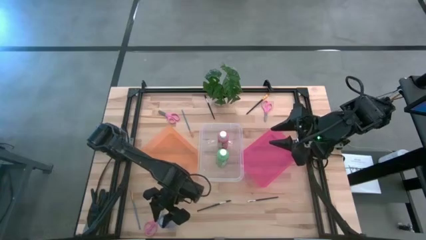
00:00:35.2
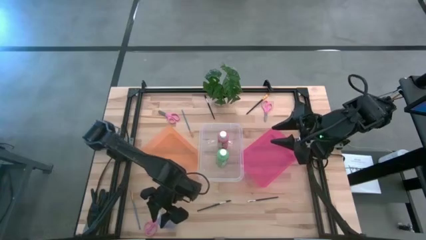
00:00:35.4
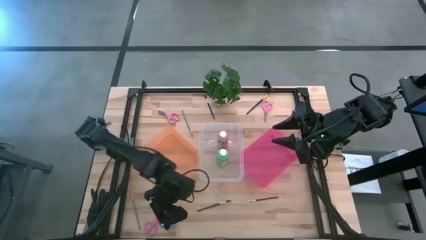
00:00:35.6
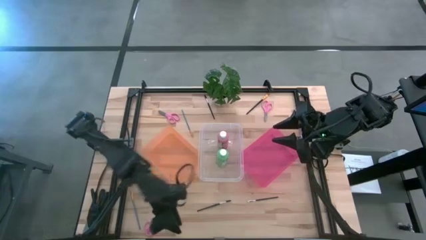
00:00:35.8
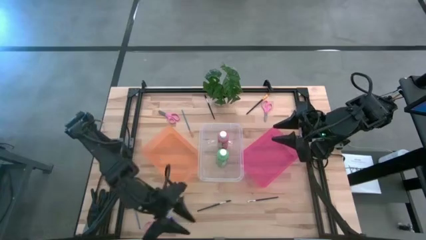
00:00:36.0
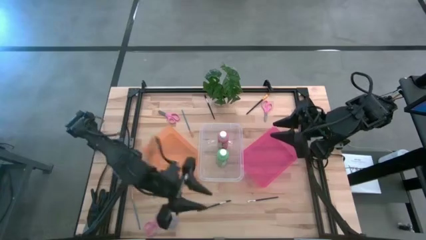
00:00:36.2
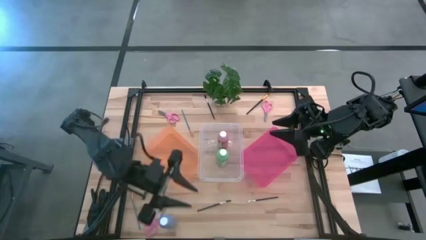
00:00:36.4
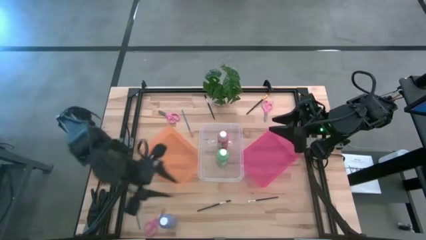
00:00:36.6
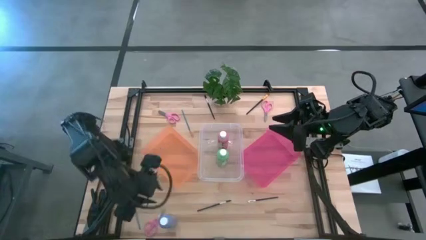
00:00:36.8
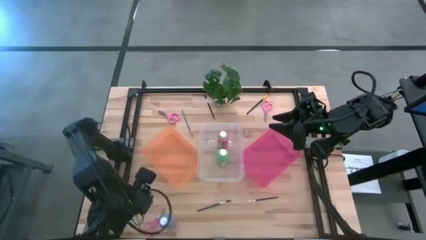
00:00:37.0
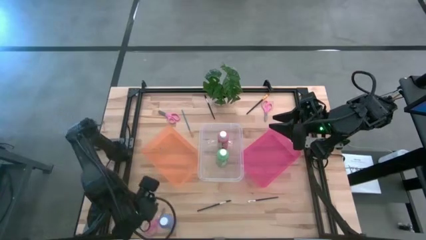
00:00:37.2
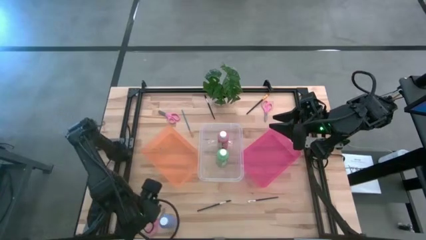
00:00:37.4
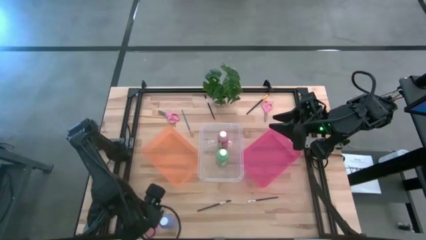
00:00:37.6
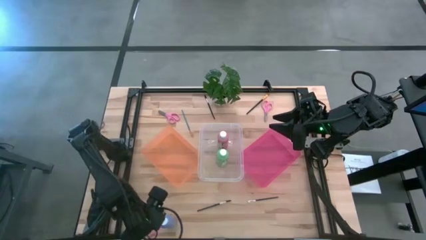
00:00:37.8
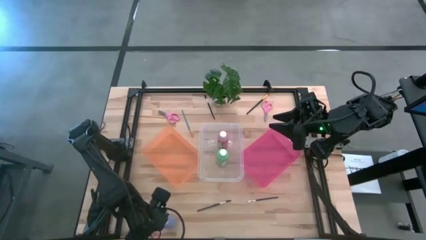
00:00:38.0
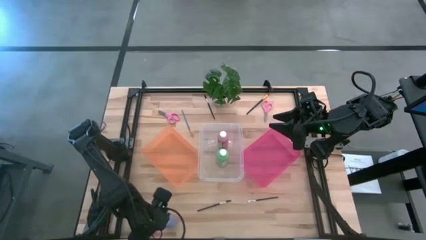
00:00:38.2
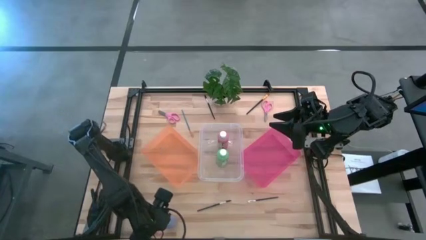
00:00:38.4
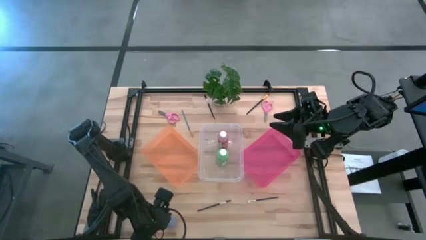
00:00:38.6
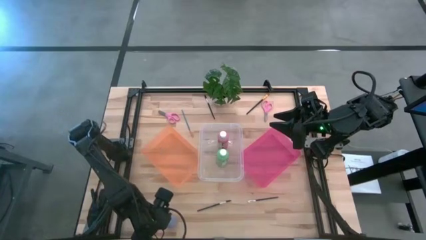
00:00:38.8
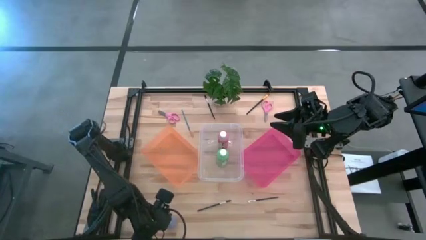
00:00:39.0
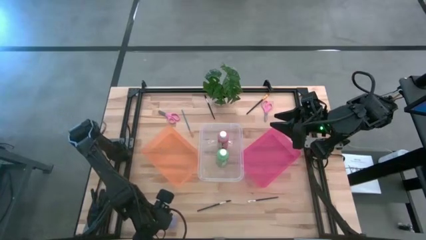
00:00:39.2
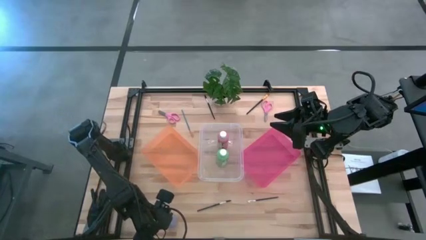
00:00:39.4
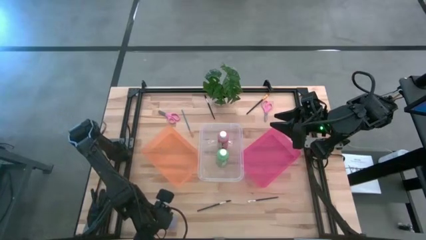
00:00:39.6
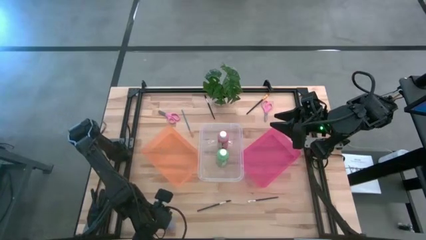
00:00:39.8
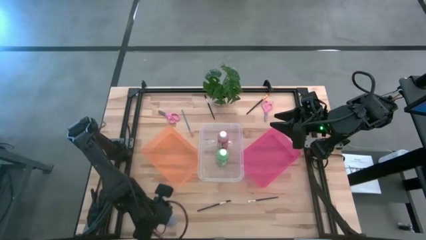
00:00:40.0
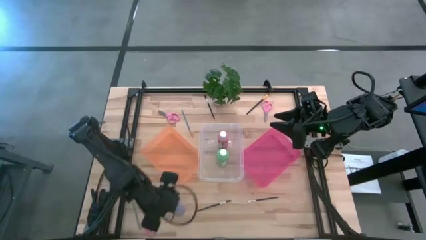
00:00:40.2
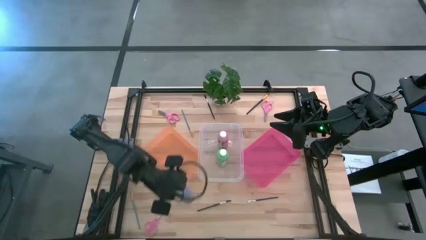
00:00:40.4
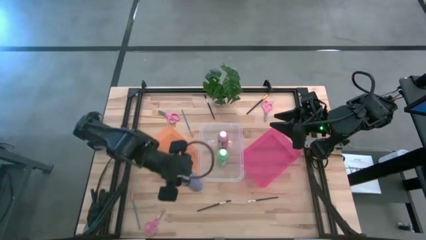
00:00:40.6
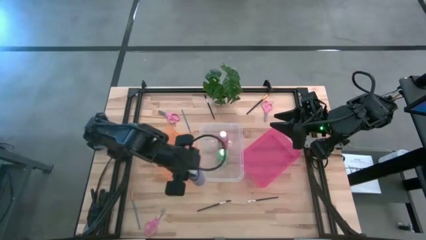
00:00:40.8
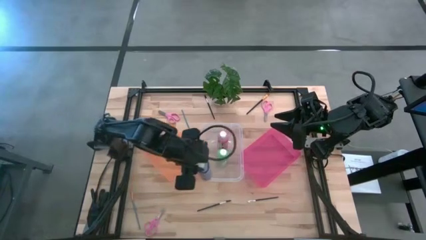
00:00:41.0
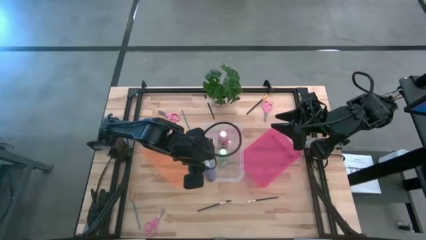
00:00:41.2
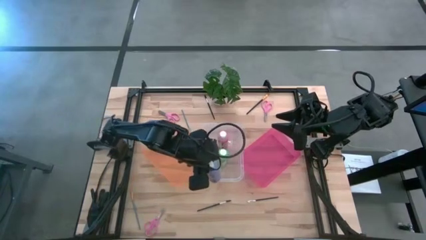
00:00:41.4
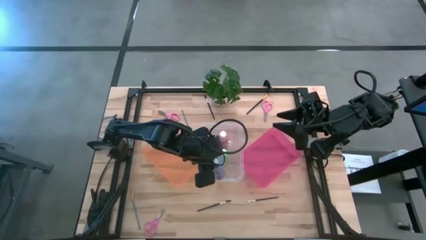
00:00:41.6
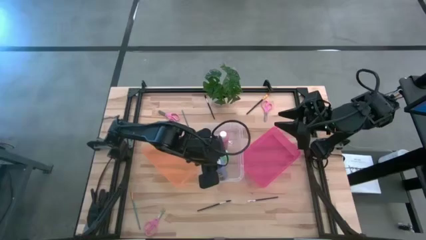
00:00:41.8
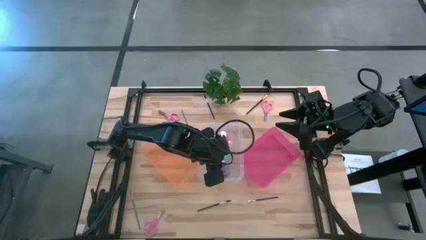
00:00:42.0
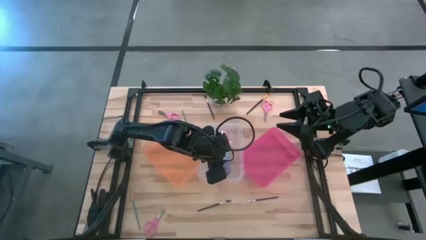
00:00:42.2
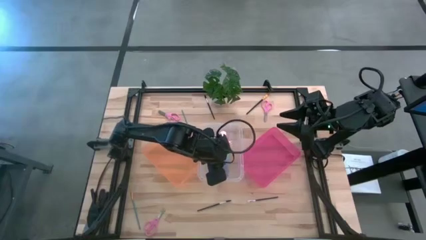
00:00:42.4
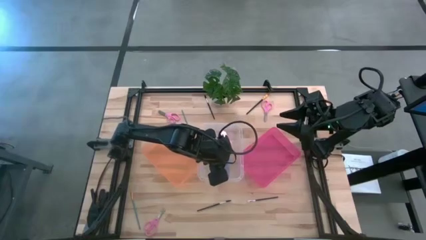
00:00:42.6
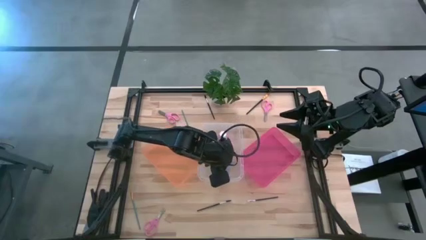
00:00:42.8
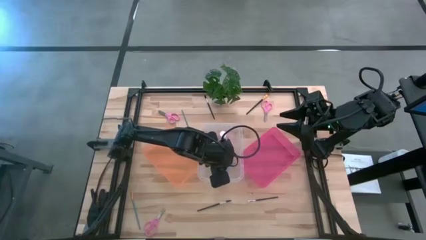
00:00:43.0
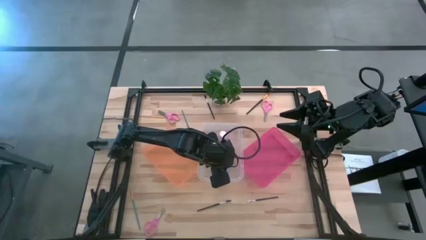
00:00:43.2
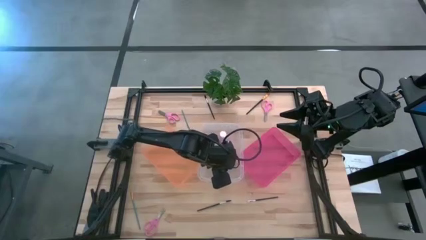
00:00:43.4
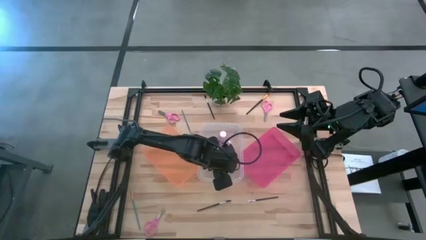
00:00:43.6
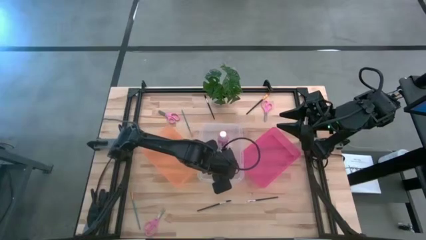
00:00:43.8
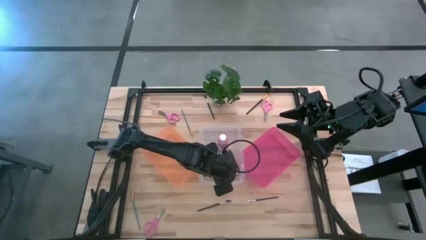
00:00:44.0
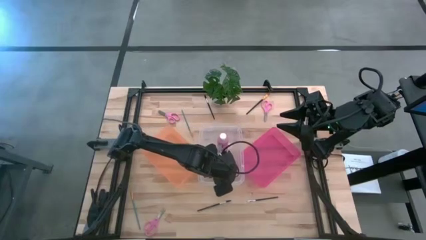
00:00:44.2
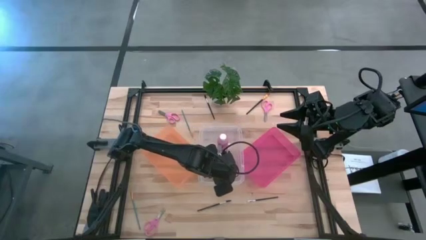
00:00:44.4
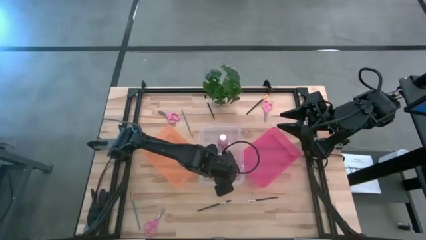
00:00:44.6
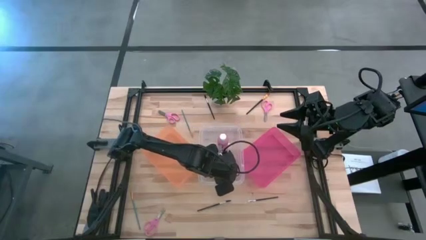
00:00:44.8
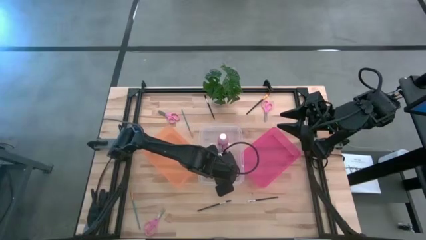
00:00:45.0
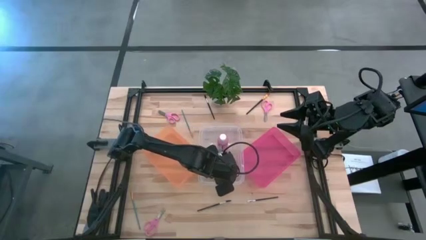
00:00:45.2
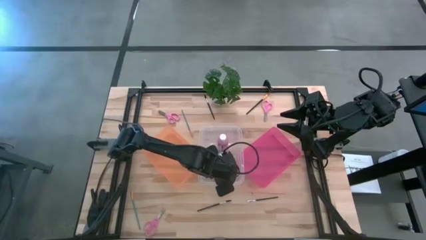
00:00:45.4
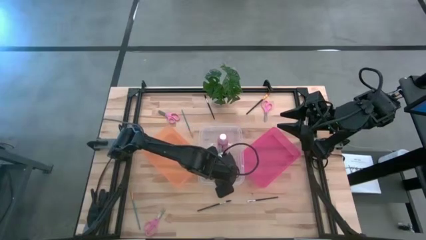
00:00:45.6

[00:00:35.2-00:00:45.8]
Task: Pick & Place Paint Supplies
Put the blue paint bottle into the transparent bin

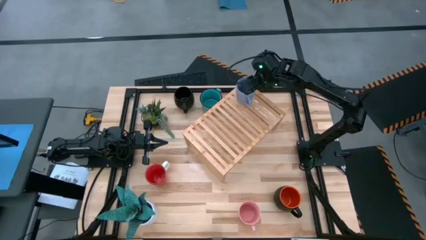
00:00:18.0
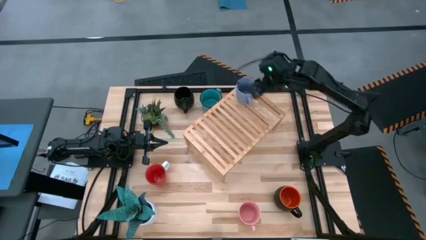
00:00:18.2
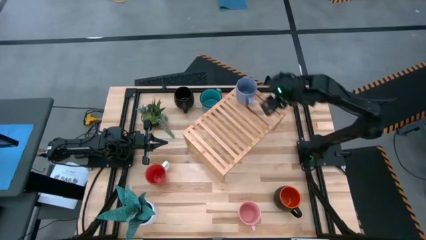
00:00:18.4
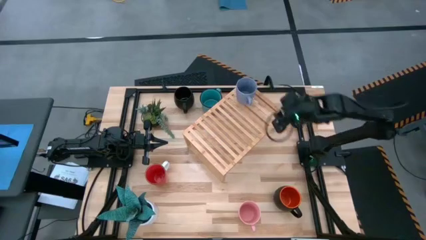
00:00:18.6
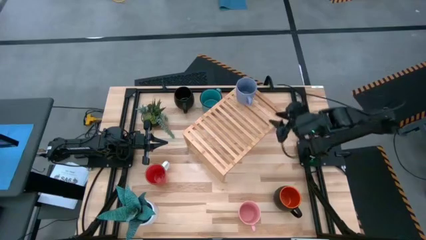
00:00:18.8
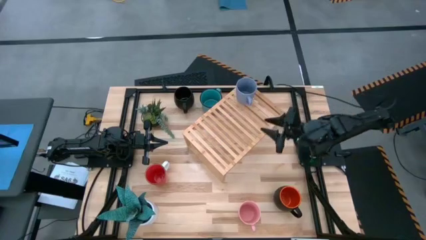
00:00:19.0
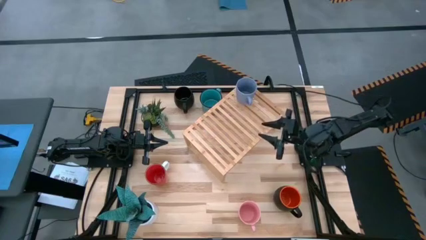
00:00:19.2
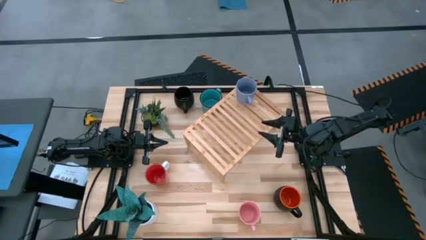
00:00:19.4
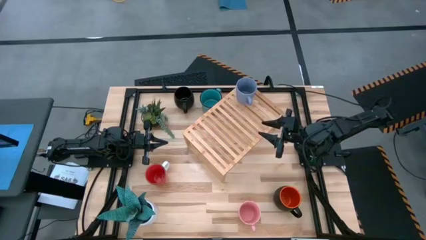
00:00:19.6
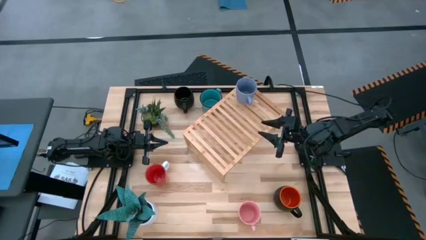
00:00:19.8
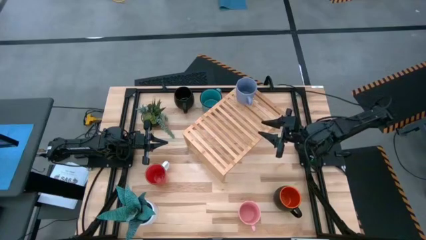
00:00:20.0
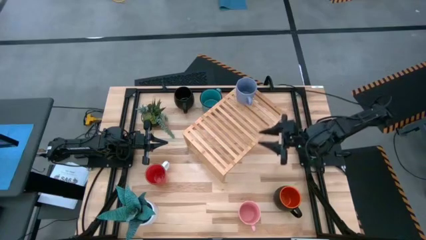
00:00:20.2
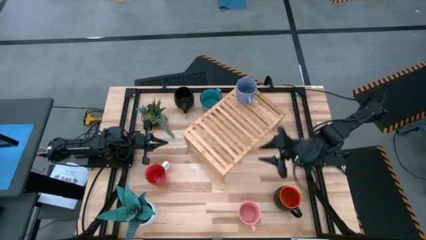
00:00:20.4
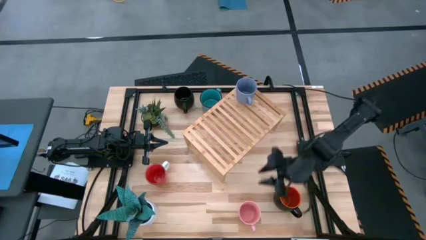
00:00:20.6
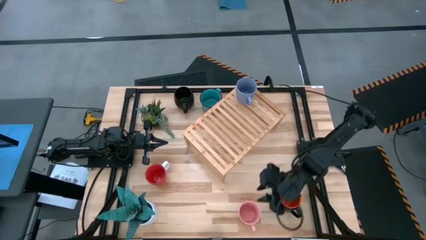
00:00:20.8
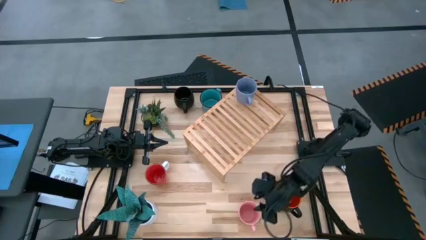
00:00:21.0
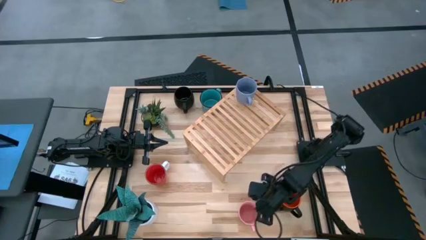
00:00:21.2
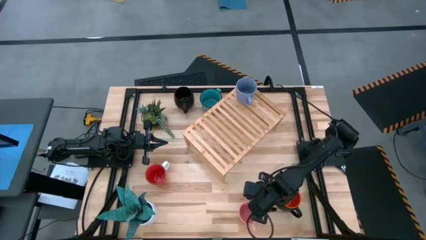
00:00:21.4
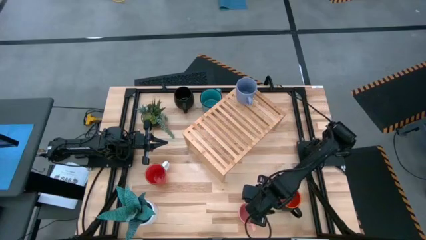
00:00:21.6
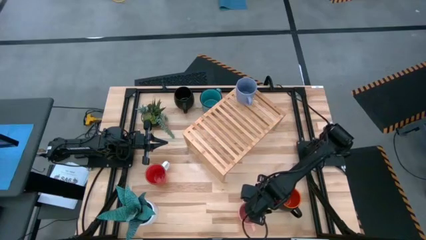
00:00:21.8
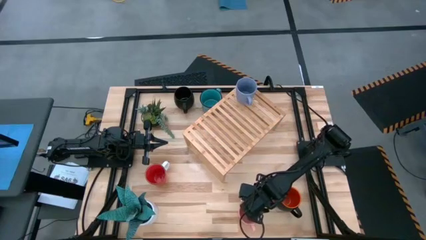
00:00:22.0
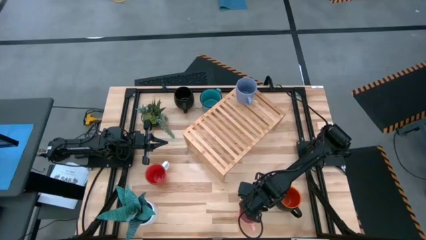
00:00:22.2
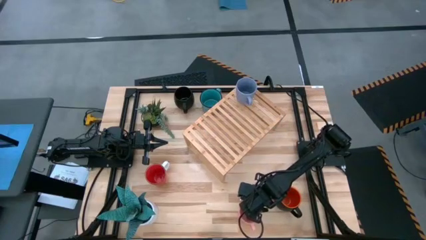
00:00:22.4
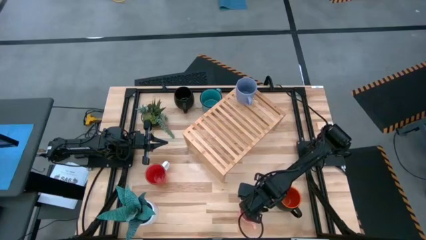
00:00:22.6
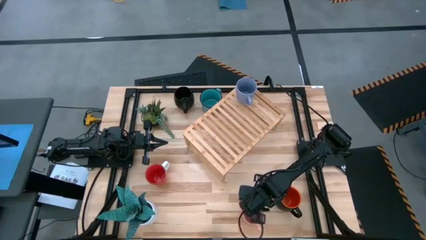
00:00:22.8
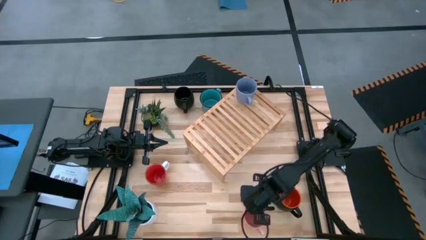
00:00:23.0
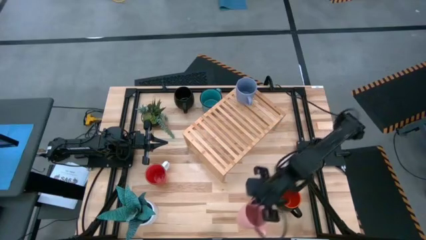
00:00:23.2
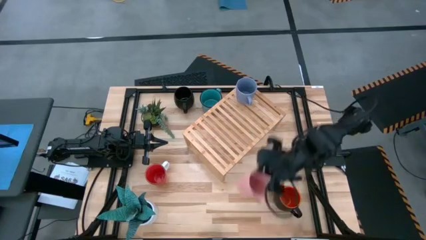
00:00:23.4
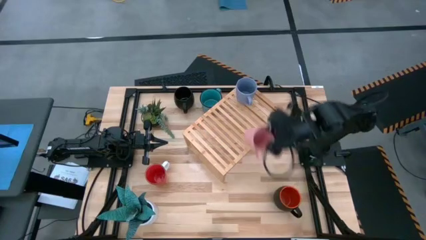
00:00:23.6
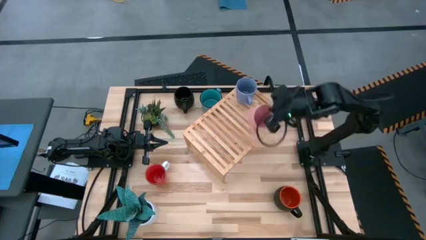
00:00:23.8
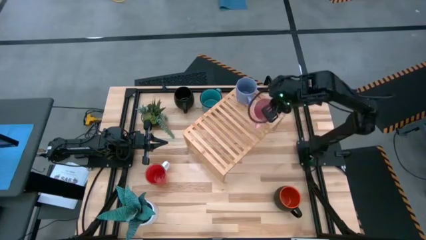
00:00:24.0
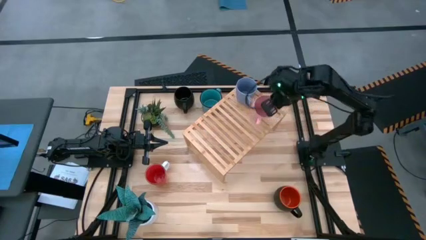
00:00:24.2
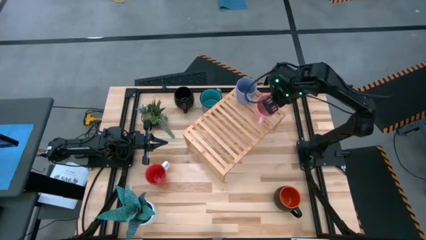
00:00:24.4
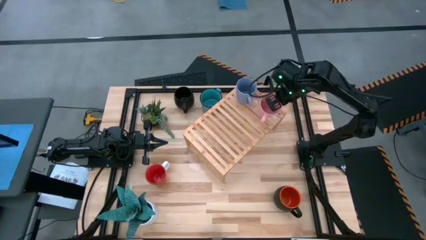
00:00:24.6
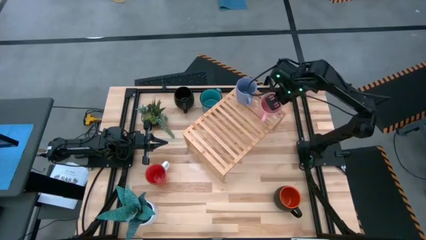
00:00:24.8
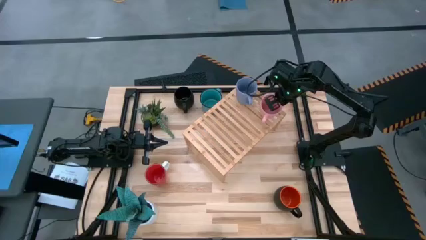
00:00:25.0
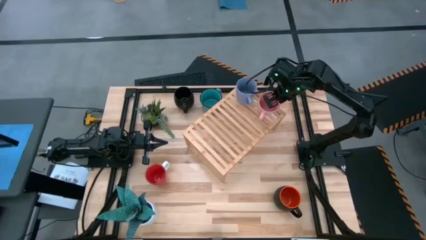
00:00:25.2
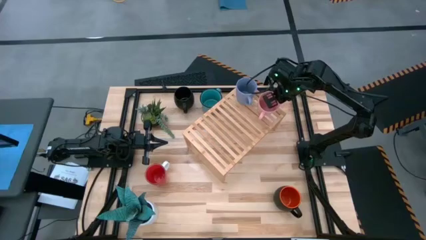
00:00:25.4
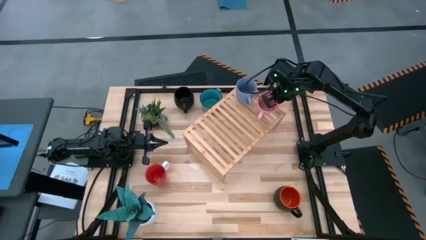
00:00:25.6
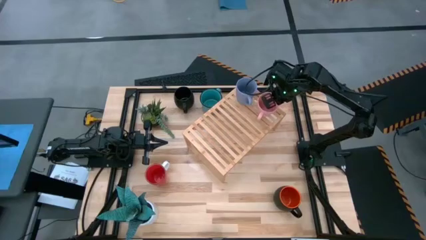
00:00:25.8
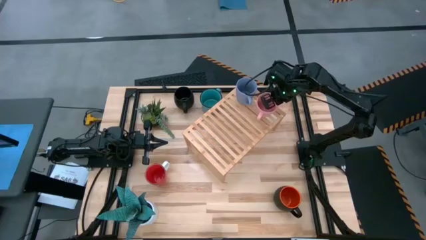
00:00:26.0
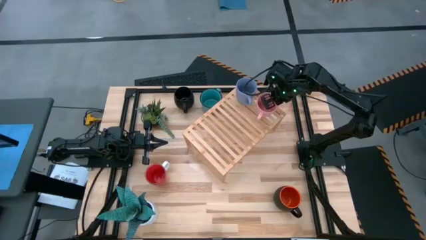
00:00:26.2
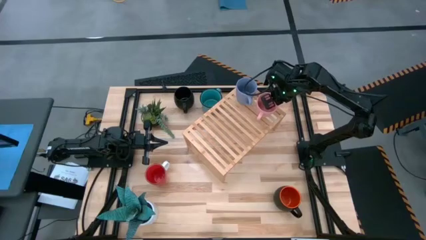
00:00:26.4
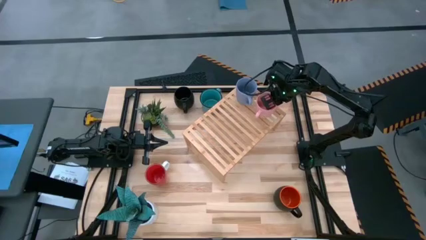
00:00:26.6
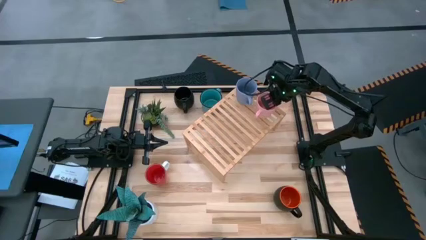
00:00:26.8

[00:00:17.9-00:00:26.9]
Task: Place coffee mugs
Put the pink mug on the shelf
